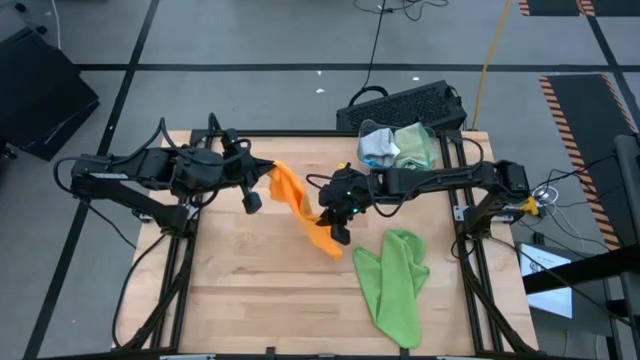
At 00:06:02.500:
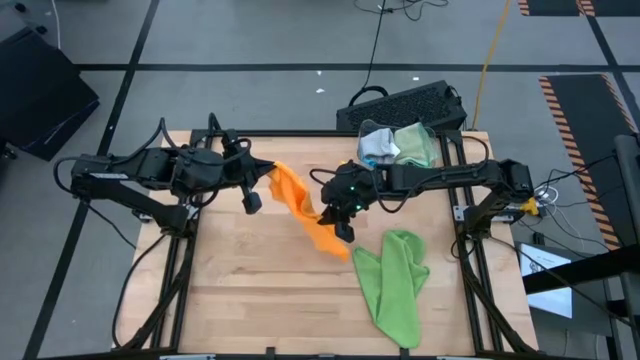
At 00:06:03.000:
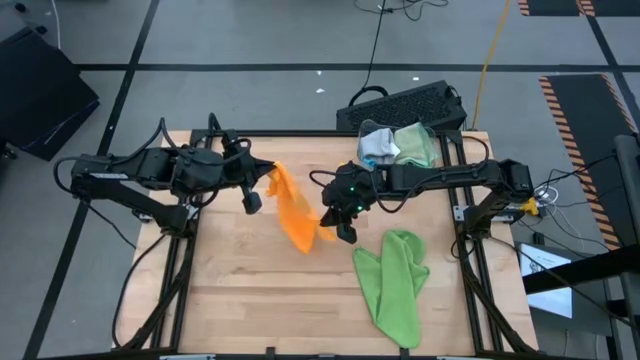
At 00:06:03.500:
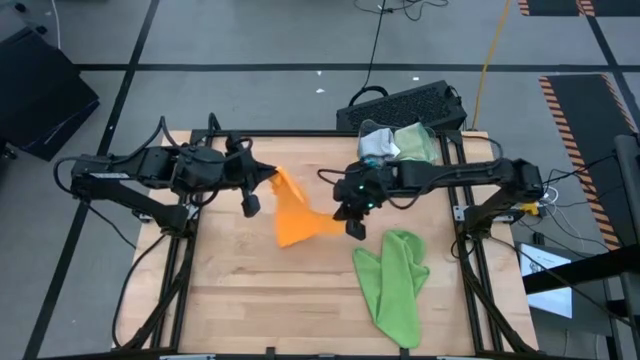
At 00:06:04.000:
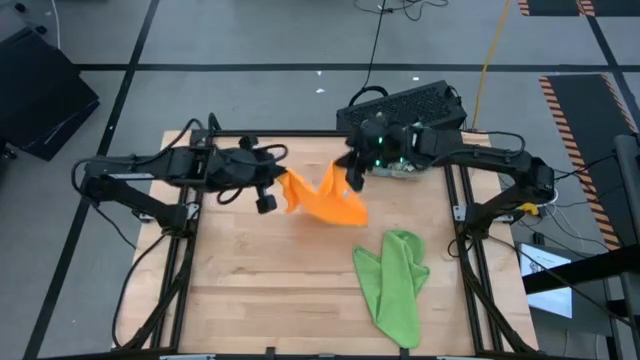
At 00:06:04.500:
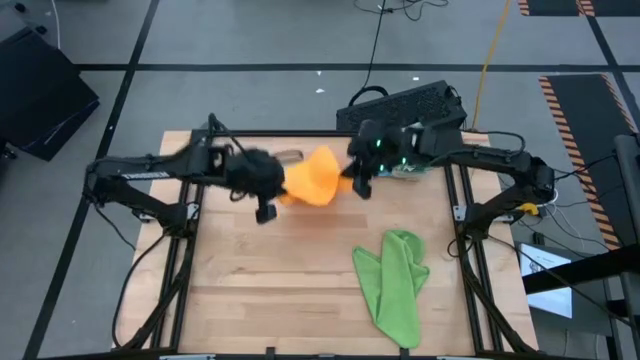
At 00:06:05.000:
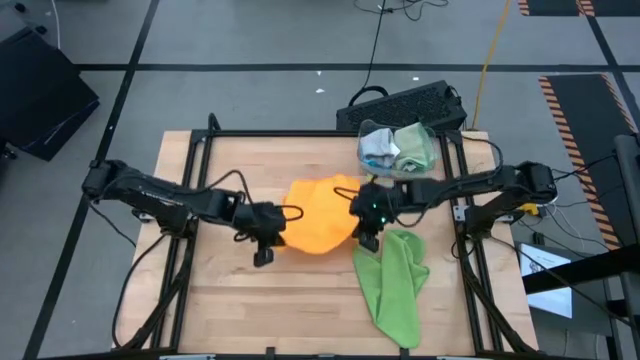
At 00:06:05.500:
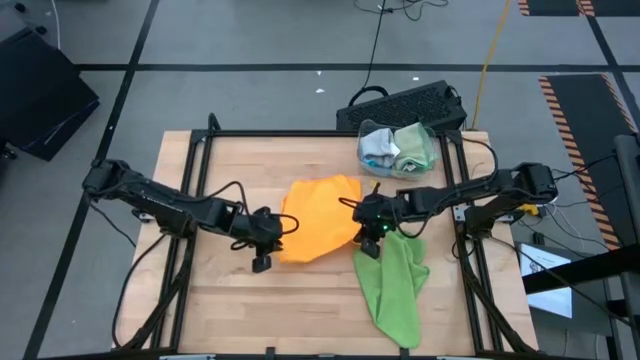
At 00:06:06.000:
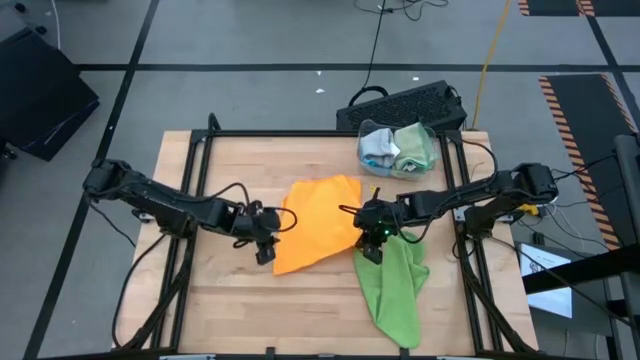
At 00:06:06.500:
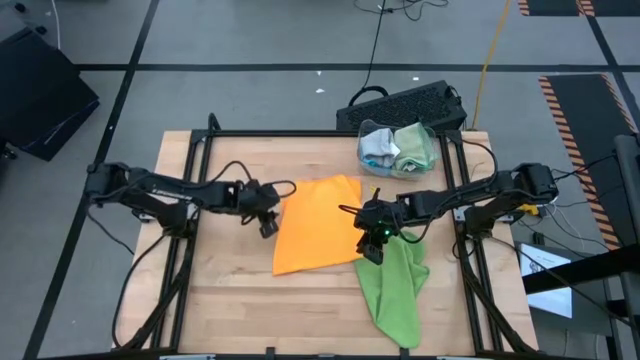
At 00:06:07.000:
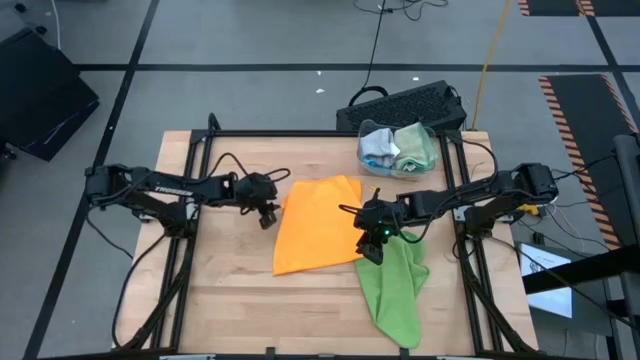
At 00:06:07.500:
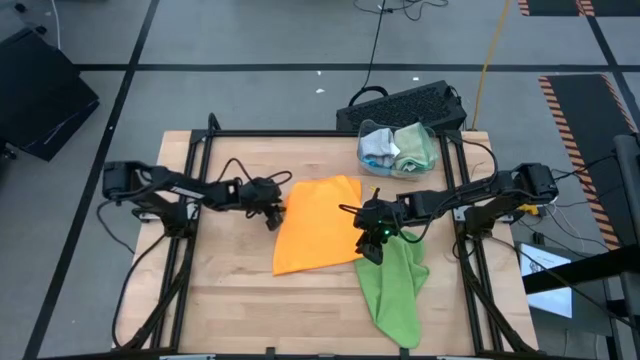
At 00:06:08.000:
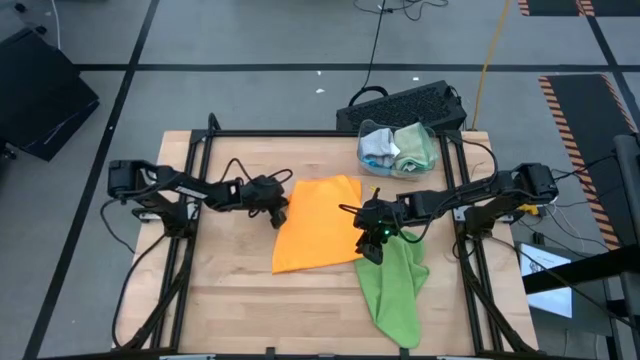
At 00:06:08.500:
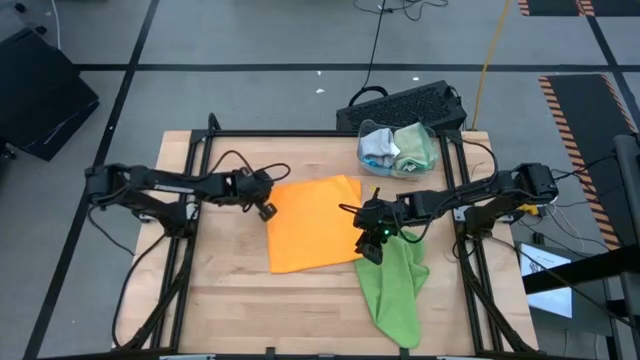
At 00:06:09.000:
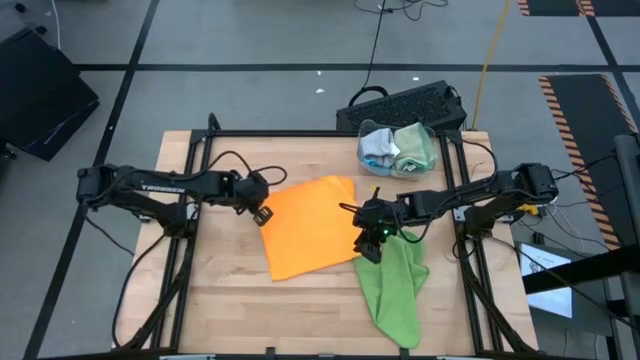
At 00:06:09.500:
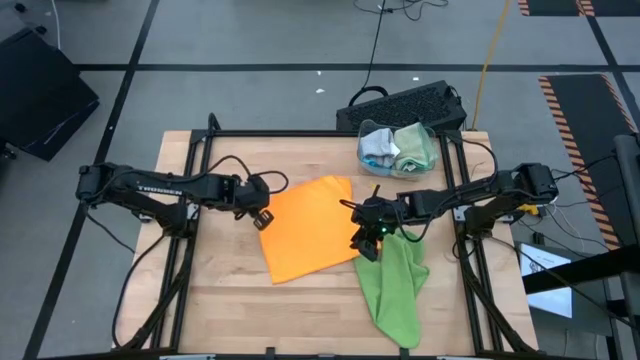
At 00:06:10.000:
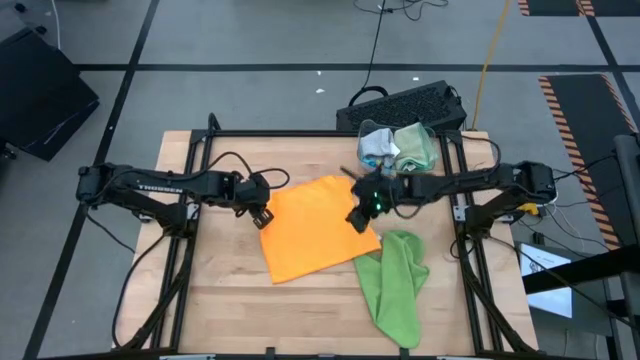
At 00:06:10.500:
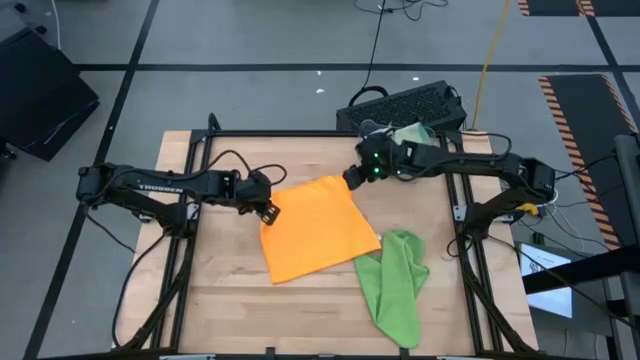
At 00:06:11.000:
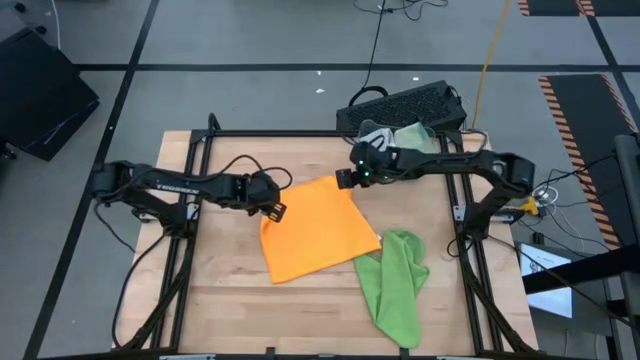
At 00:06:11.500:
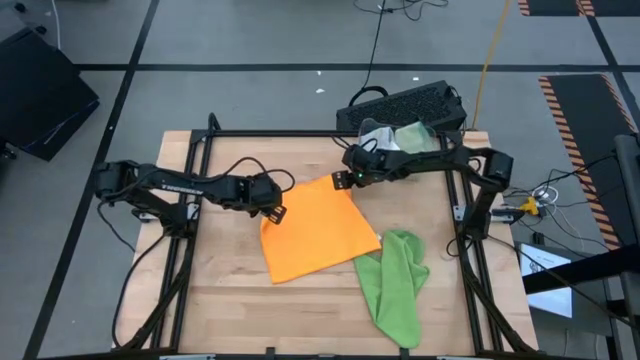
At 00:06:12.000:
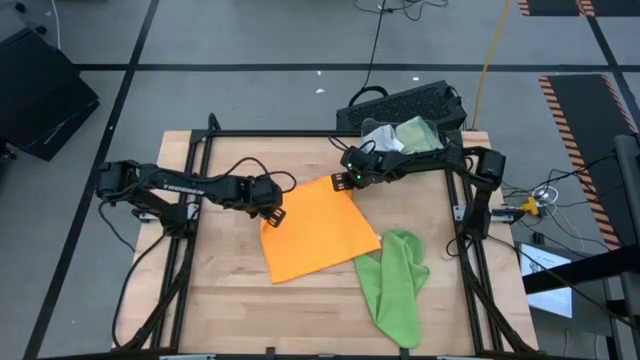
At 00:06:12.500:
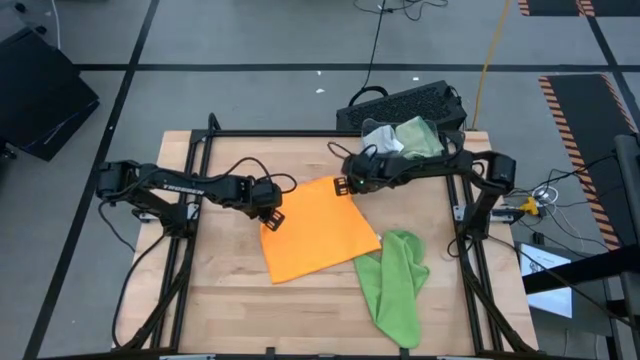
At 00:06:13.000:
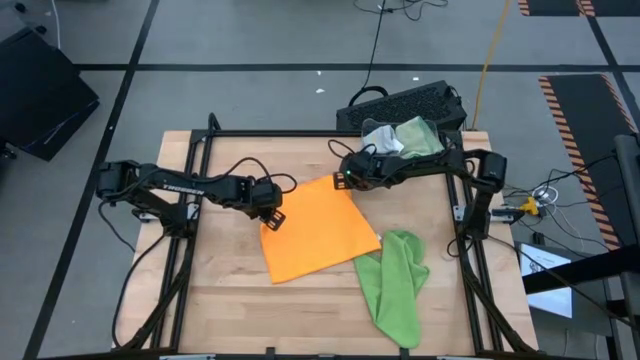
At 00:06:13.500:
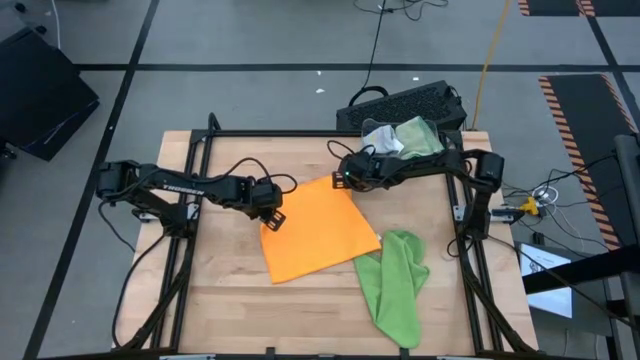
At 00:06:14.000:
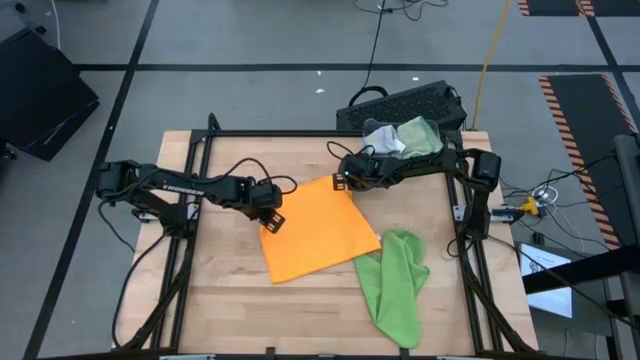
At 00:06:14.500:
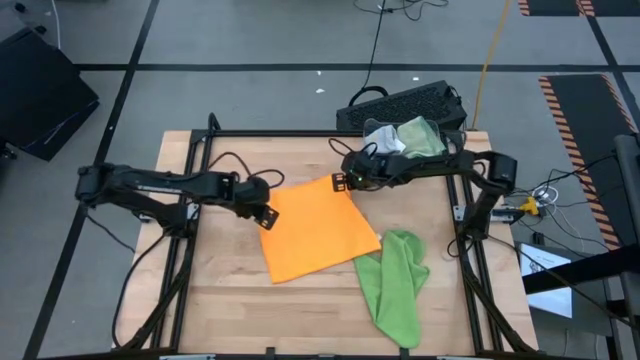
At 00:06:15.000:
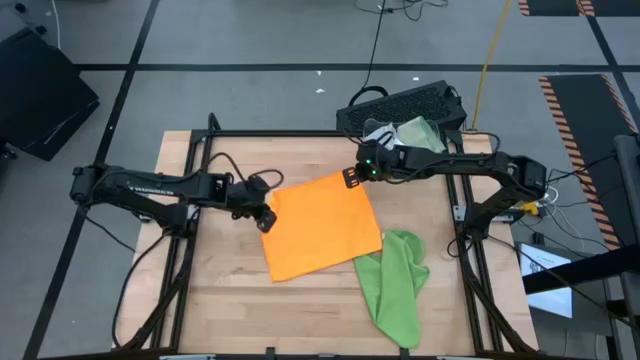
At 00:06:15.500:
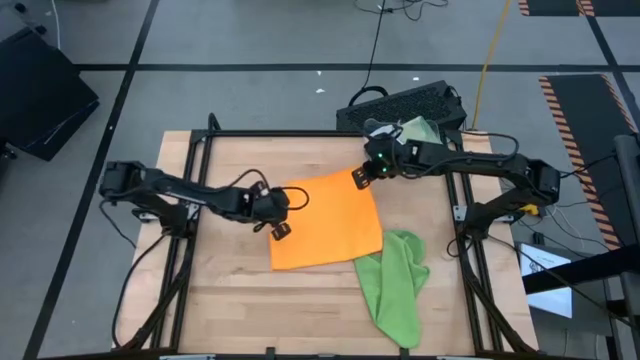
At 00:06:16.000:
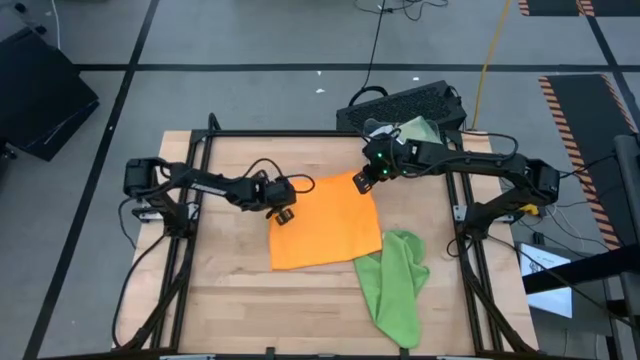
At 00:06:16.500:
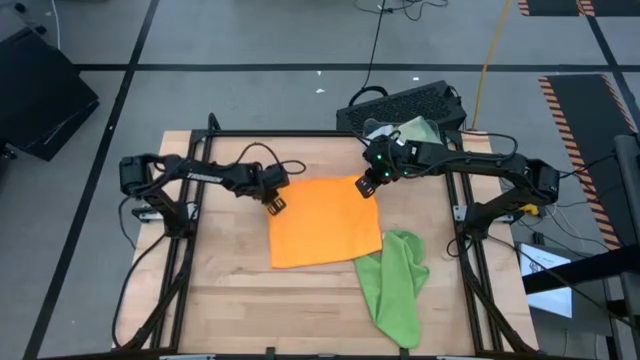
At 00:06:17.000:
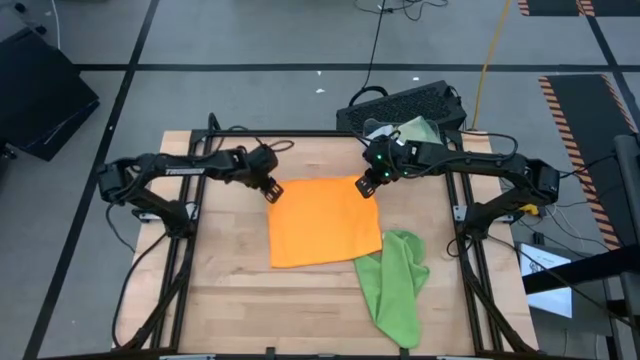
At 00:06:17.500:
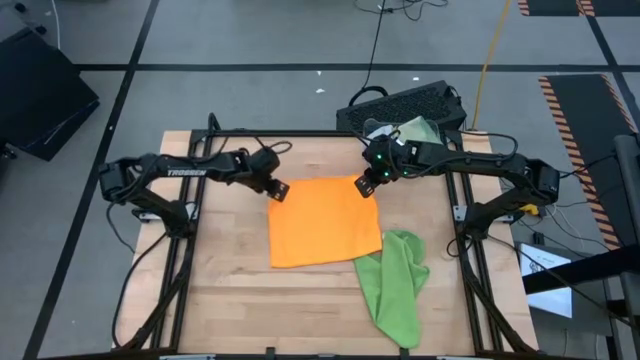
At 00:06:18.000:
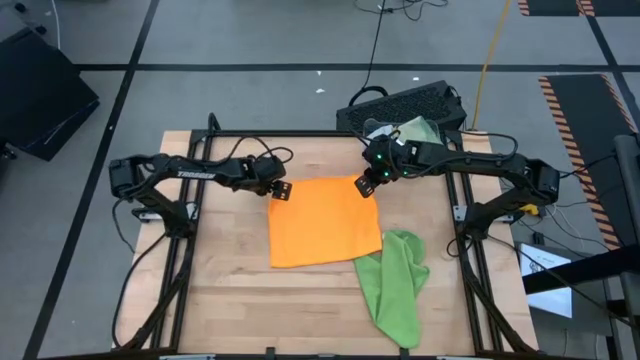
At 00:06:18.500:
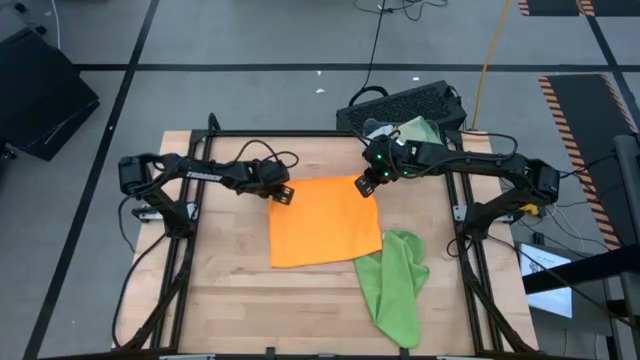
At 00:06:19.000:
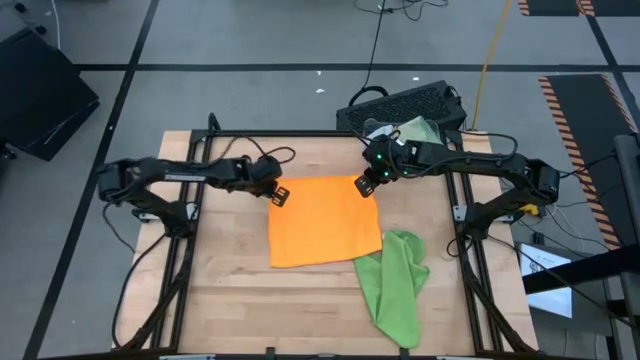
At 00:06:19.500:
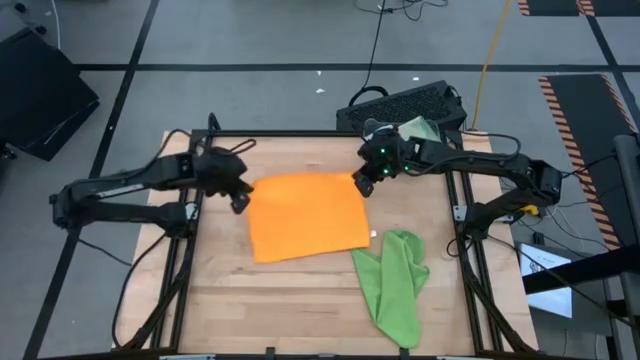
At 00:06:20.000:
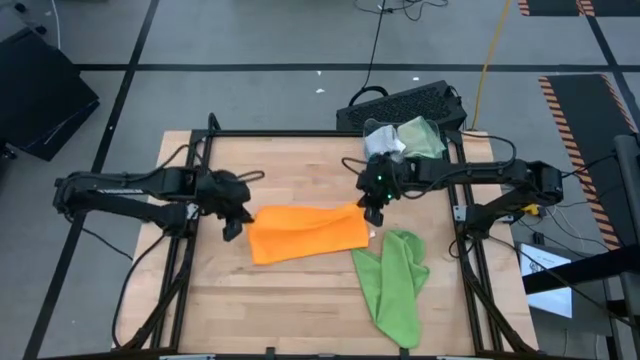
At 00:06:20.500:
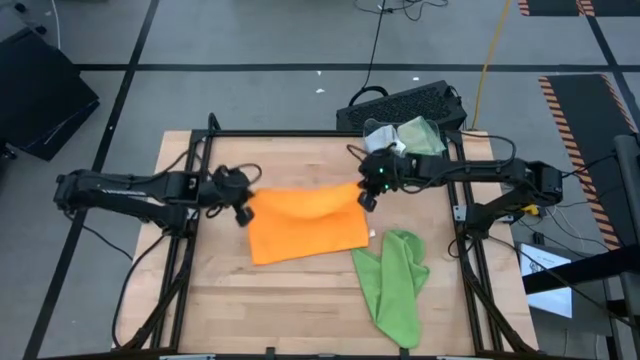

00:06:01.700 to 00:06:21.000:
Task: Fold microfiber towels
Fold the yellow microfiber towel
